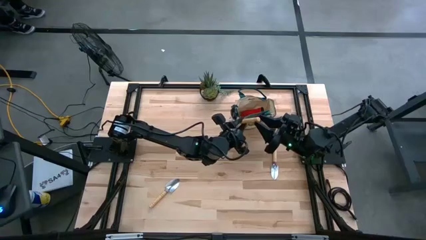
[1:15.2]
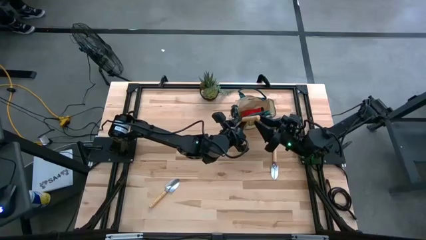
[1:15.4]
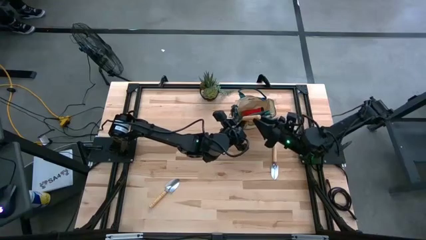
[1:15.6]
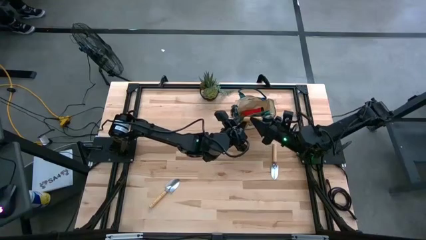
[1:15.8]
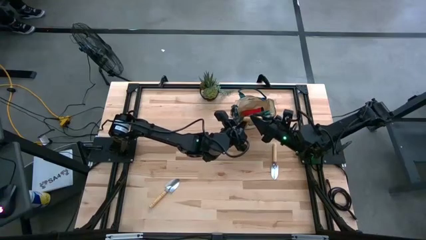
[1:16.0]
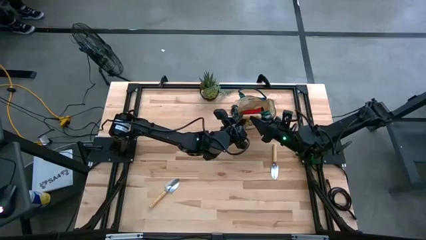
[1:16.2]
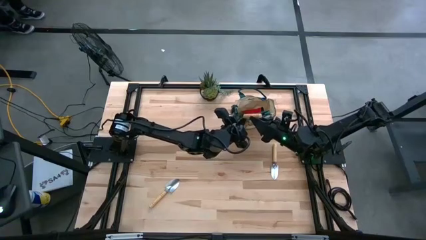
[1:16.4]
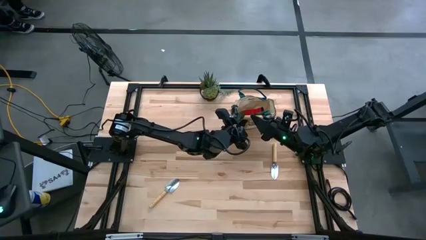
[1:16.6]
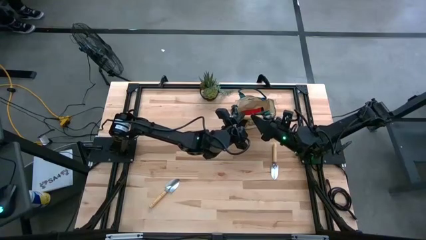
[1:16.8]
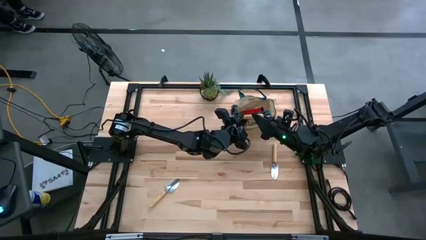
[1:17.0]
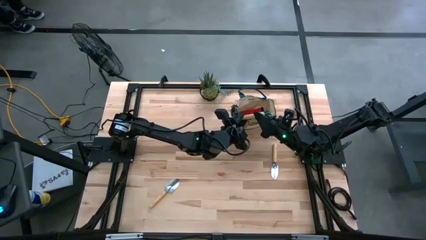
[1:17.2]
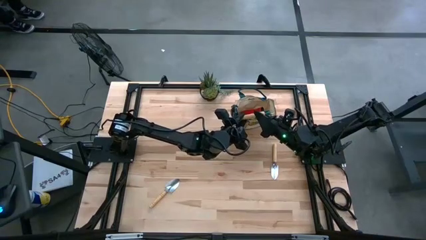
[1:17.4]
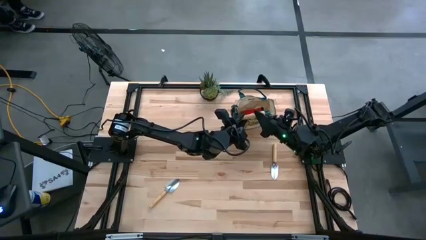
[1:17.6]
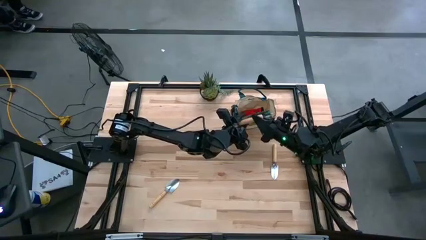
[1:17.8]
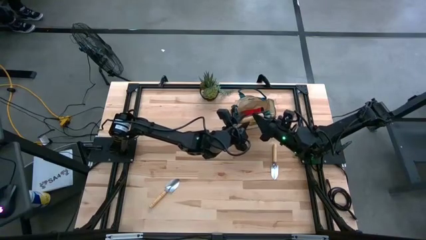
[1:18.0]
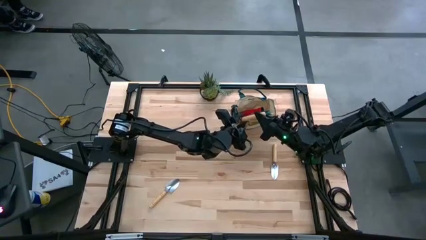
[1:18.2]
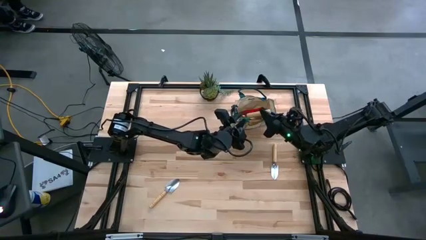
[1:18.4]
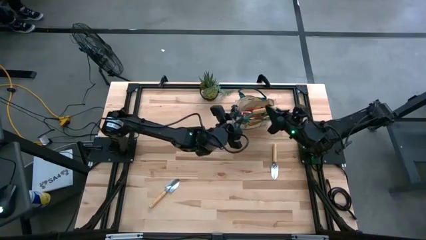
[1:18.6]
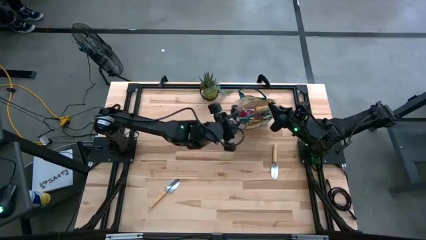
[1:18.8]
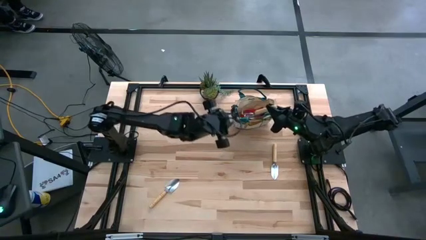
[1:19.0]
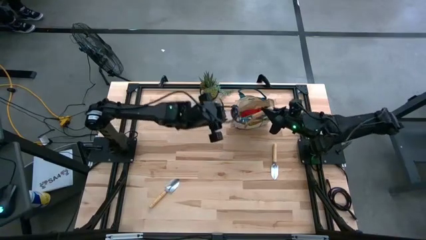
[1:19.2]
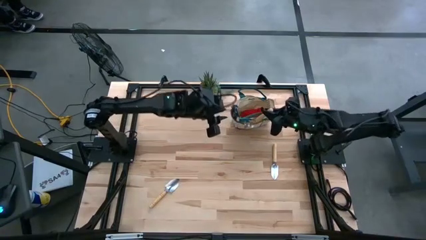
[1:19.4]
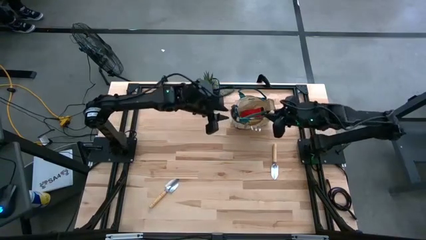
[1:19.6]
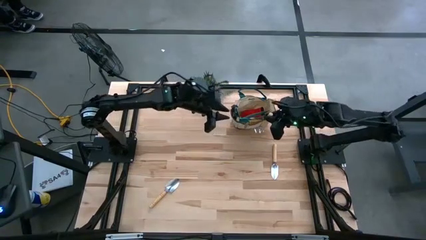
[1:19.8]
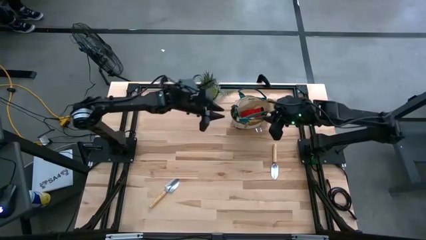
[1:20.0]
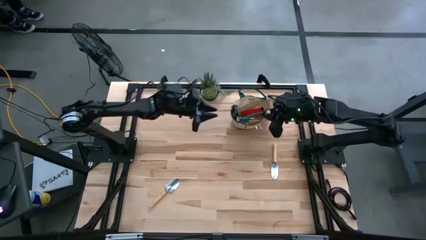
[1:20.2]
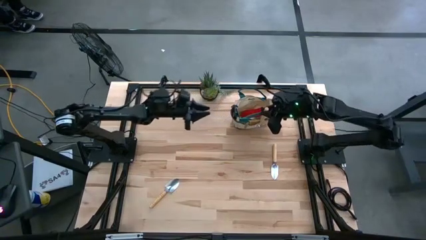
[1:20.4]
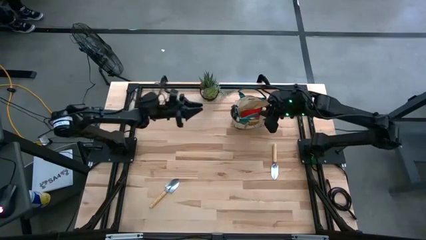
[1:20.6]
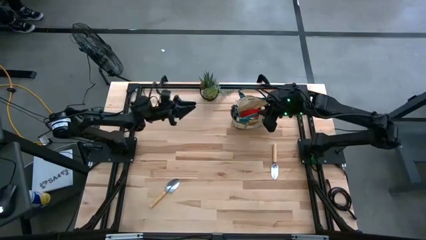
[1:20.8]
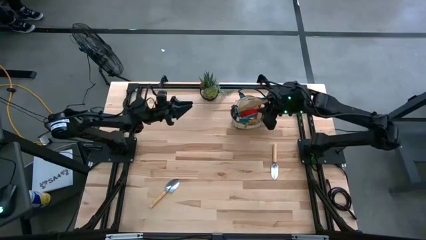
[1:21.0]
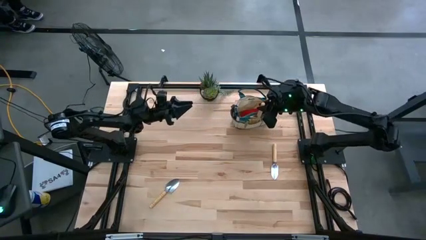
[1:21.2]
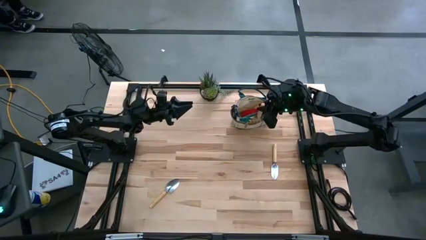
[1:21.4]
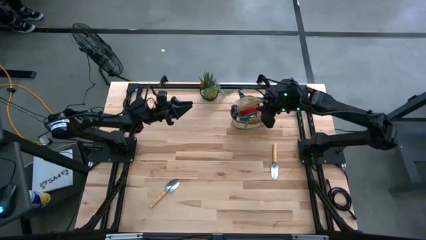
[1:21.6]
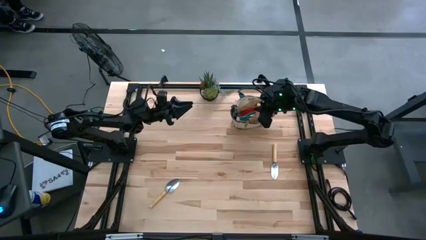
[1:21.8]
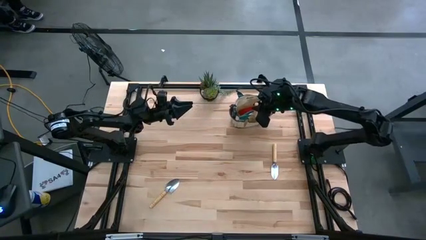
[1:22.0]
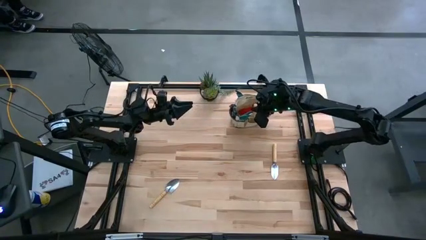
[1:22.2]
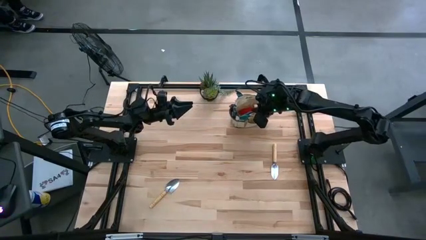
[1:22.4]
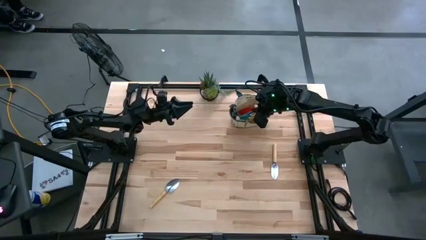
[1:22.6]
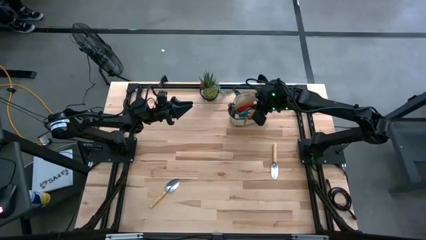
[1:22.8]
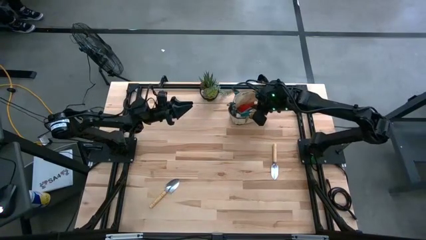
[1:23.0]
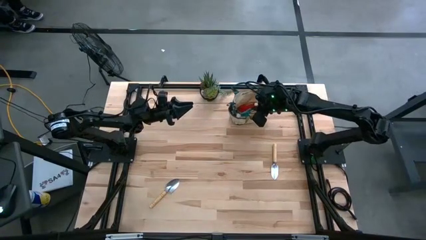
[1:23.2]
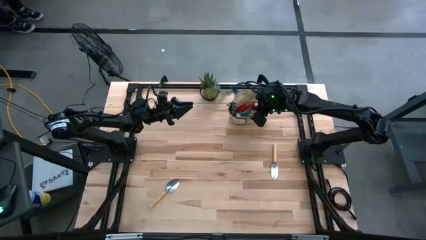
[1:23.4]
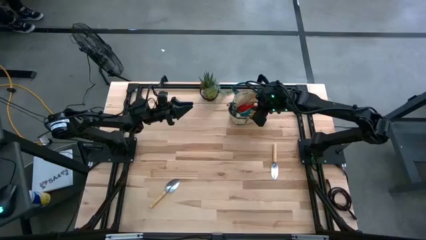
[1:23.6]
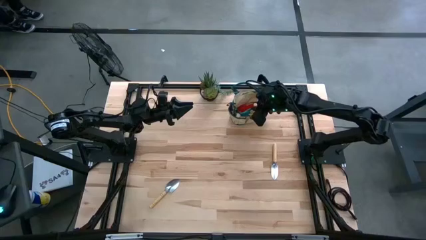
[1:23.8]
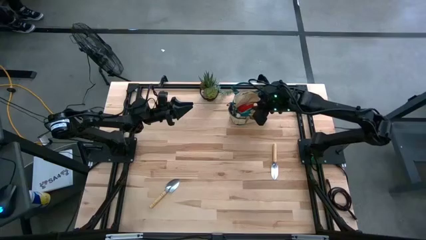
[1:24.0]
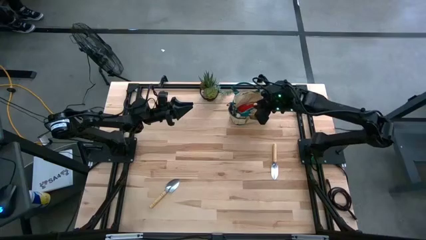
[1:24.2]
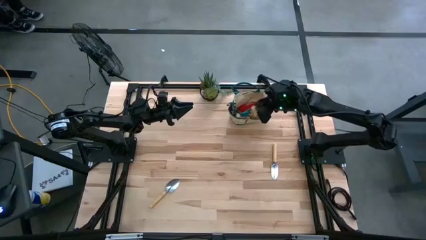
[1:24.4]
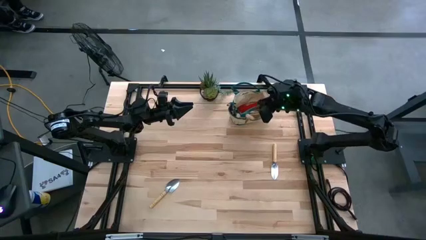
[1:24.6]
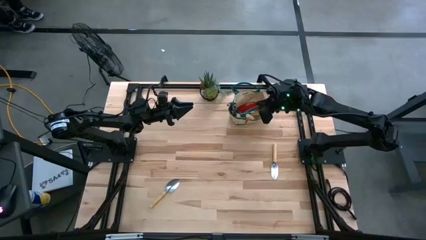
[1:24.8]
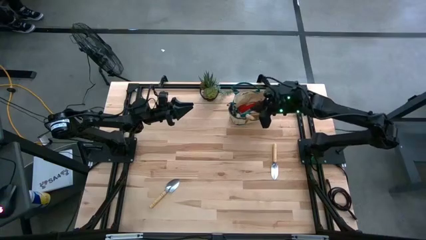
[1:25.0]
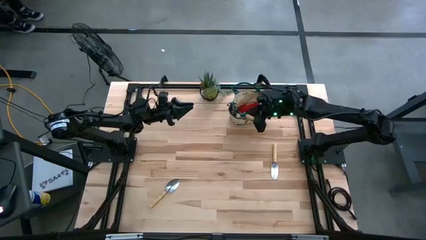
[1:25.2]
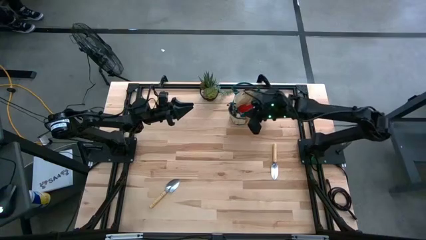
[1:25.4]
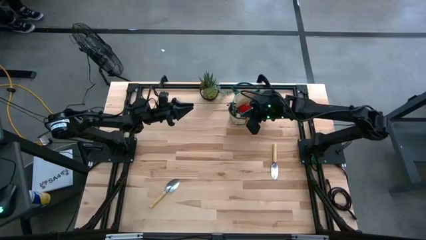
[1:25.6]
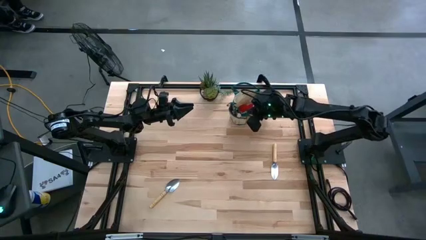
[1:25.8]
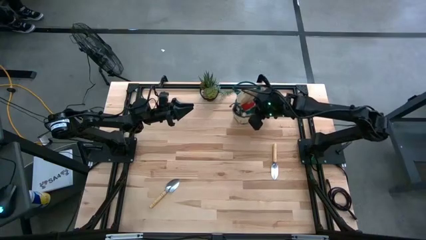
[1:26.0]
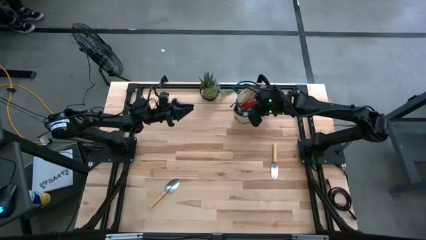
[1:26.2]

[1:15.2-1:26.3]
Task: Pick & Place Garden tools in Gardening bag
Put the light brown hand rake into the light brown gardening bag
